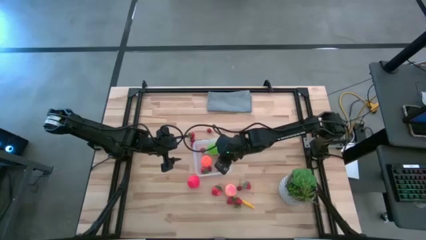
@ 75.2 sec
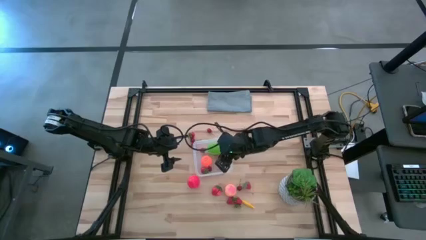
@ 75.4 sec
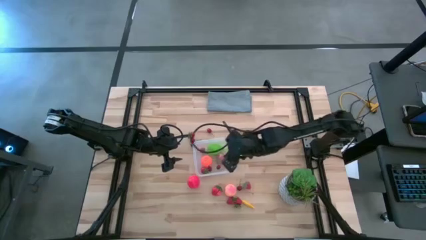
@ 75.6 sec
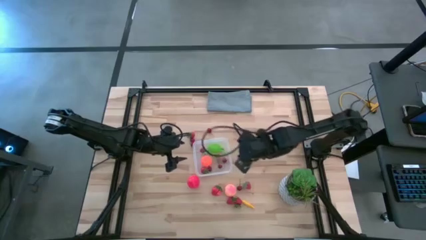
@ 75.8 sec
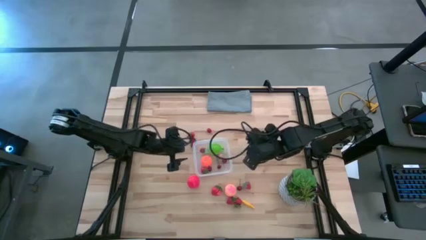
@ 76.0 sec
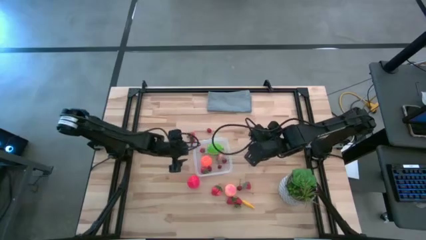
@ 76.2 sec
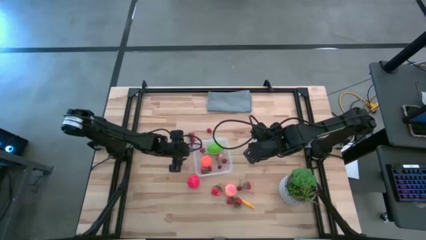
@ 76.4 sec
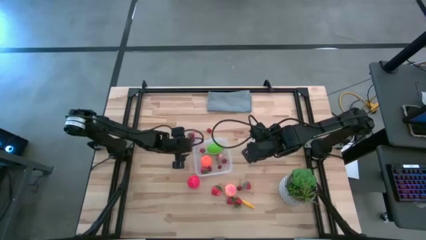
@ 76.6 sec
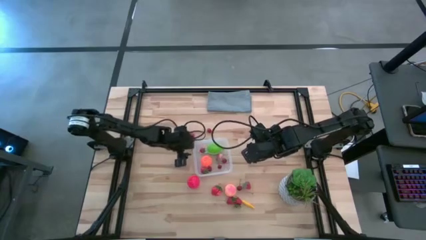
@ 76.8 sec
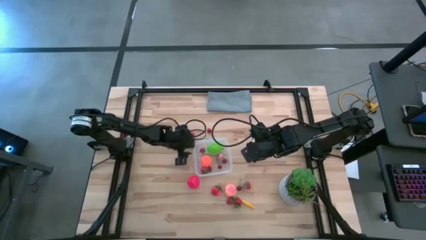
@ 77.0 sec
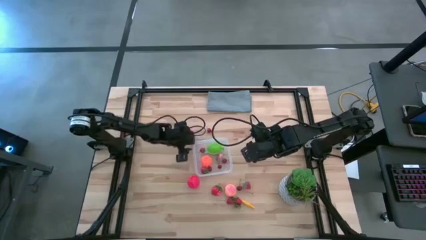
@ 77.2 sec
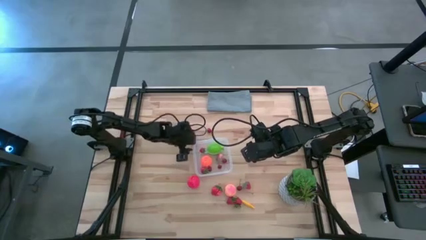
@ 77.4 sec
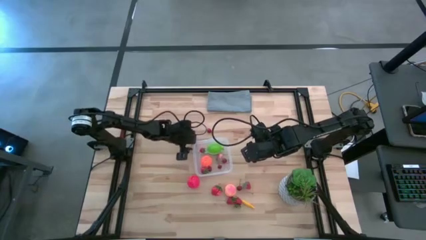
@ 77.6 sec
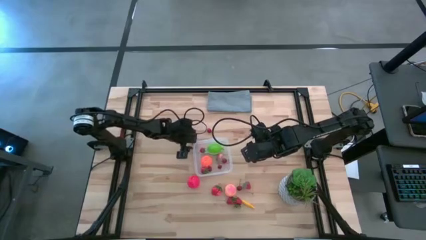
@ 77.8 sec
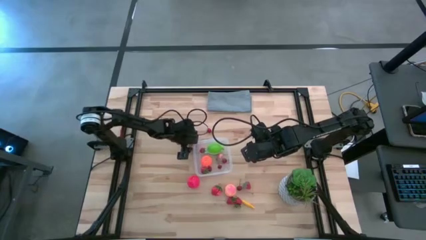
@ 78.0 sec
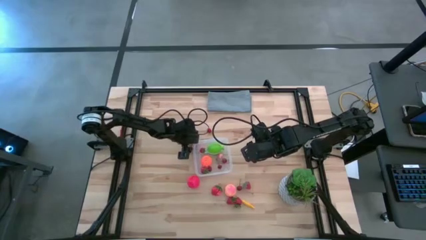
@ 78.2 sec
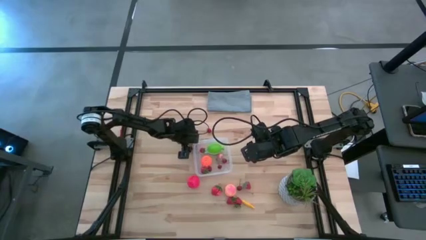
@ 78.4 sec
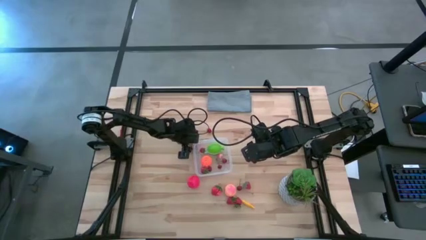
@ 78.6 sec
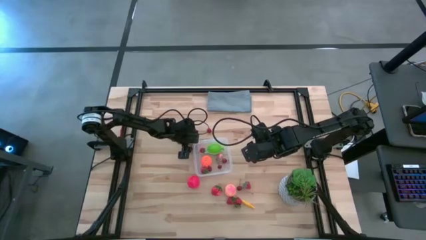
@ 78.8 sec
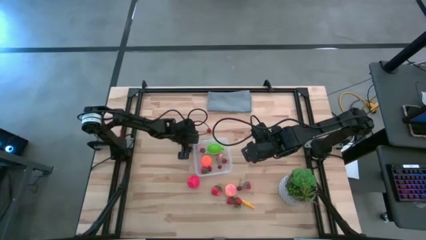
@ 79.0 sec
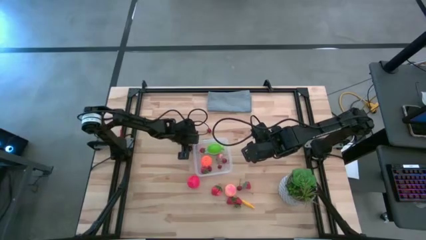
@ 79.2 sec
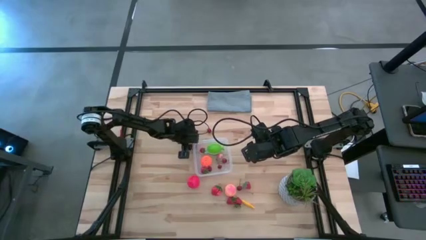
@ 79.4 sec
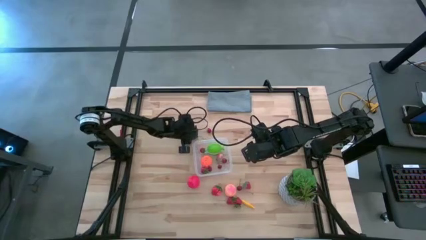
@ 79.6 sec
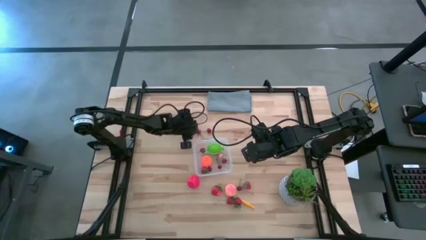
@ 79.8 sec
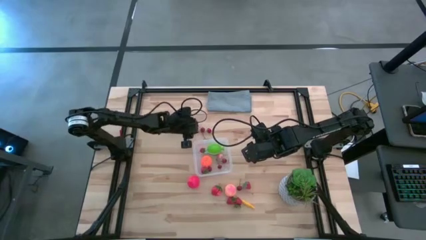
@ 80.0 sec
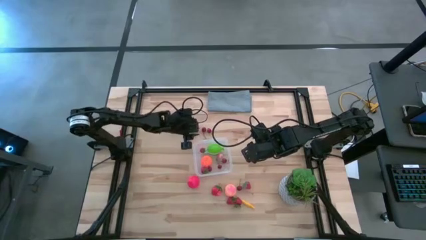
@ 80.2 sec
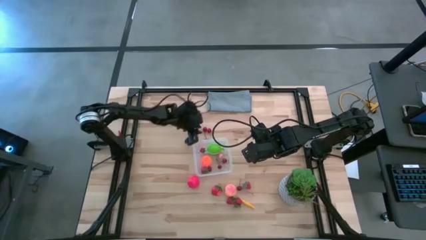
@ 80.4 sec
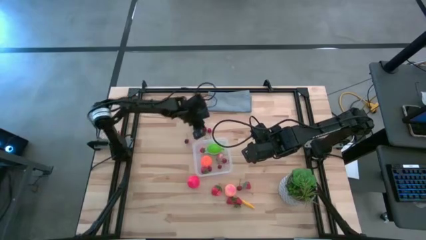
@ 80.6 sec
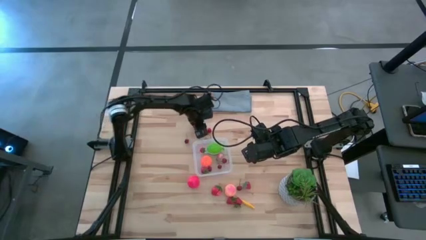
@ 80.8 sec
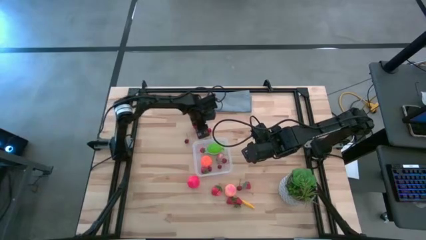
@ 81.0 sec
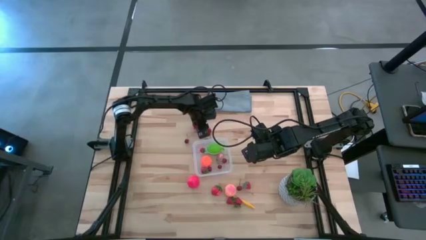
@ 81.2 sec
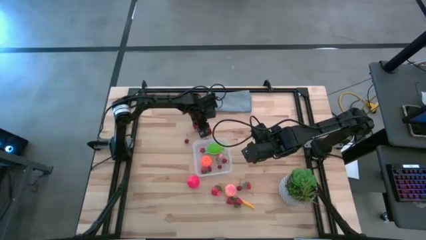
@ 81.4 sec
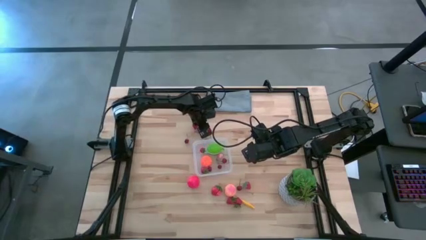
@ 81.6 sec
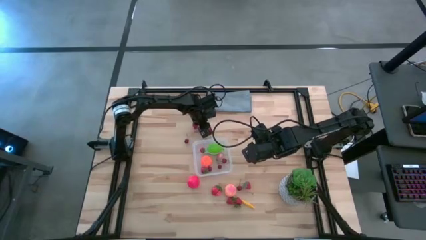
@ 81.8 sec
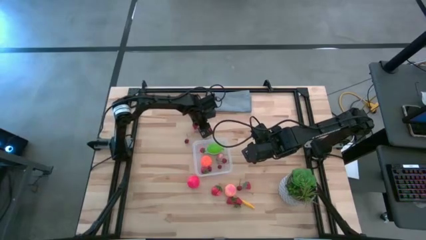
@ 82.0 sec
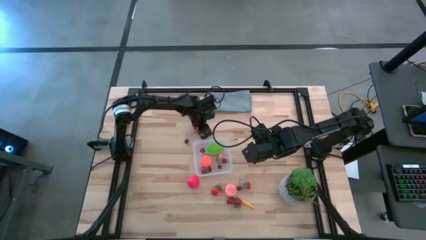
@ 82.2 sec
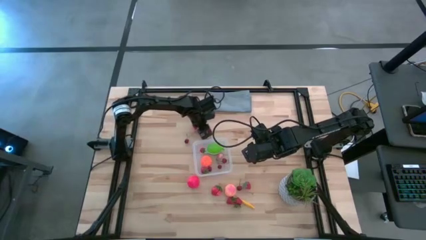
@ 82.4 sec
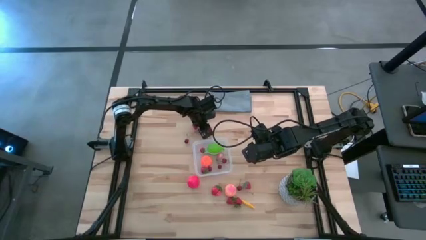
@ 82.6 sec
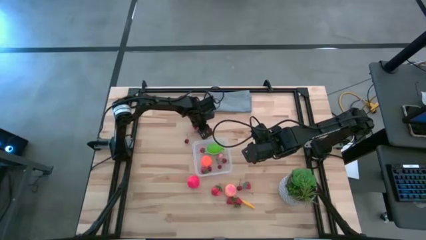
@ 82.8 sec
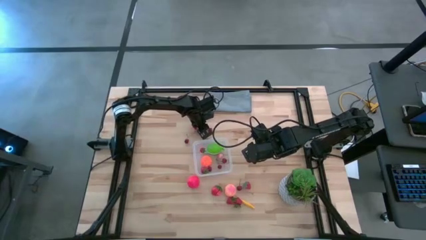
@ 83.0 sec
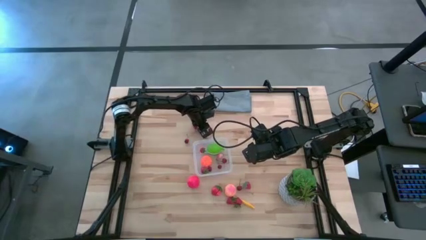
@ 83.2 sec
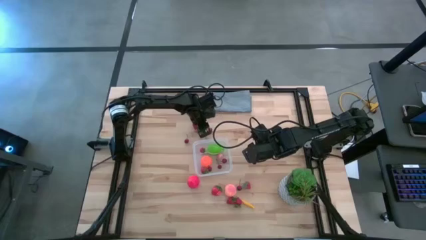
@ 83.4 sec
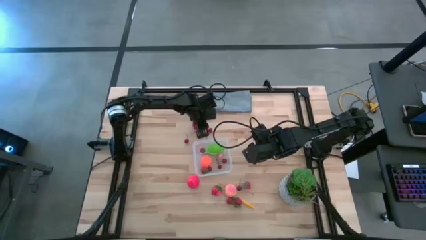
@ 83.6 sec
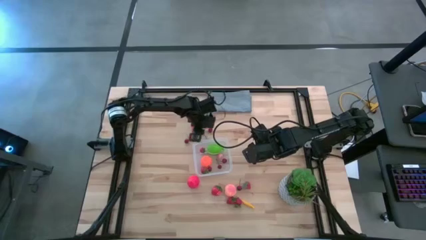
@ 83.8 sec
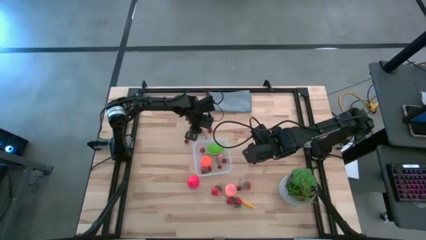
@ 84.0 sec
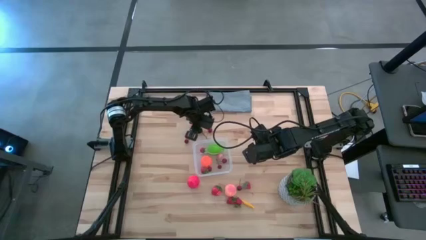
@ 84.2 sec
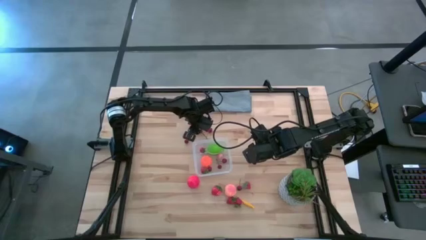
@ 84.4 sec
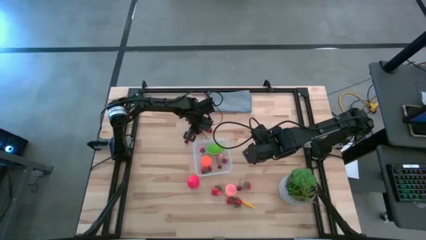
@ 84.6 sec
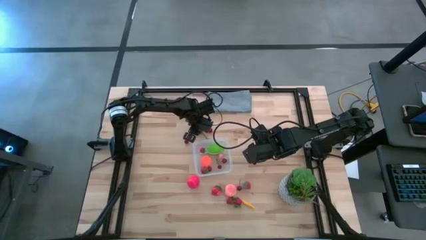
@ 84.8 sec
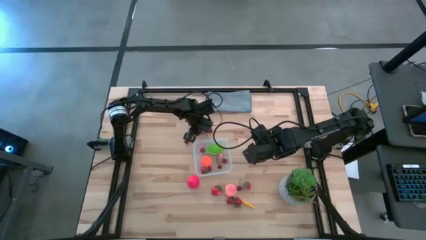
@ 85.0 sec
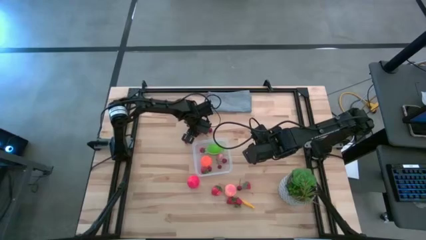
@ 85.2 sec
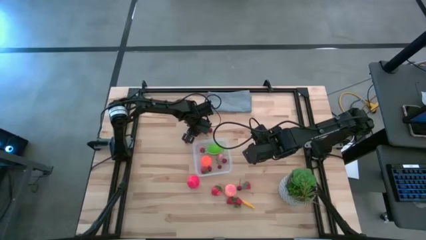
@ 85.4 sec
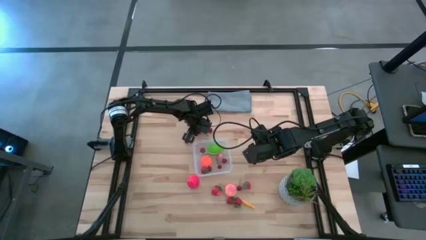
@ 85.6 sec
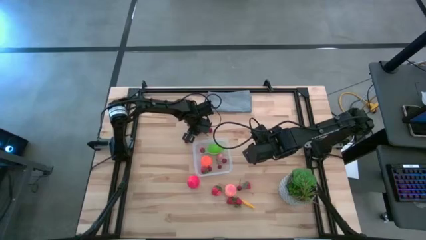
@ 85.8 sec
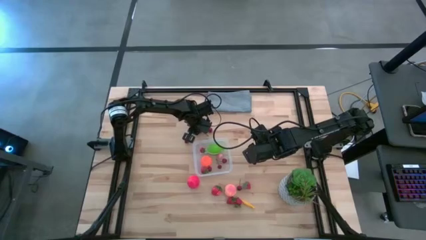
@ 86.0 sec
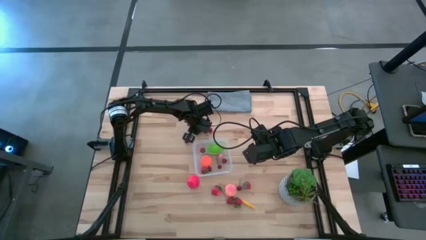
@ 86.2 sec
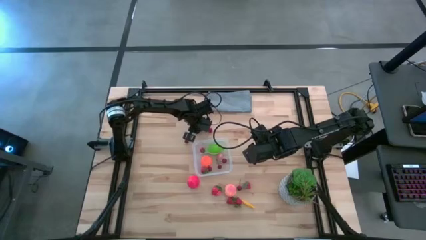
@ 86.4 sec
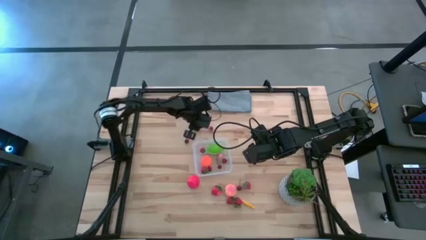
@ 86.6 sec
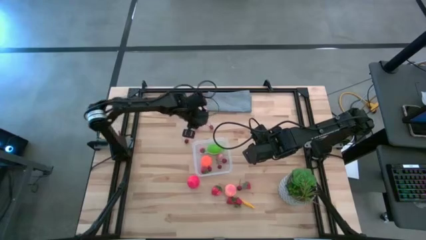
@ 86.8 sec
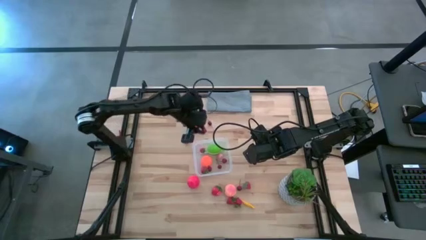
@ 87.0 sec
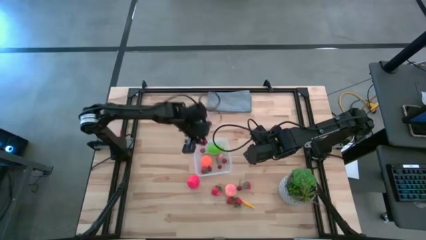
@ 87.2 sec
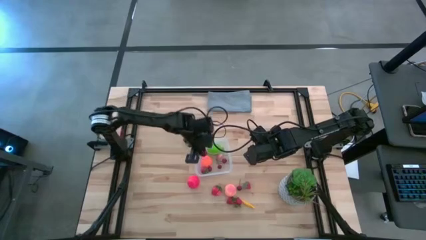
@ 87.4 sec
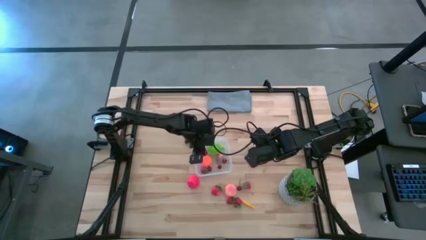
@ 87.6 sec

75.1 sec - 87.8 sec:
Task: Pick and placing Produce into tupperware
Put the red cherry into the transparent container

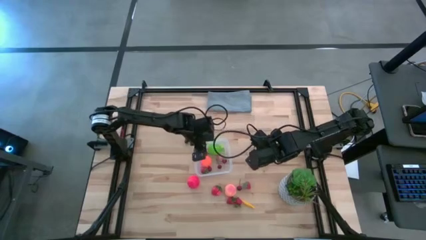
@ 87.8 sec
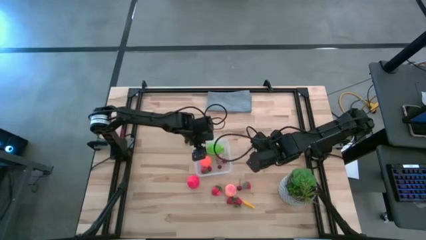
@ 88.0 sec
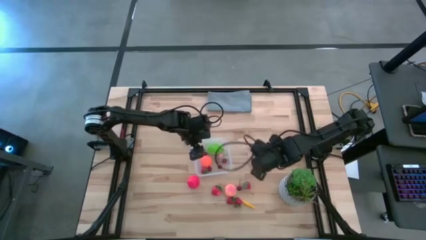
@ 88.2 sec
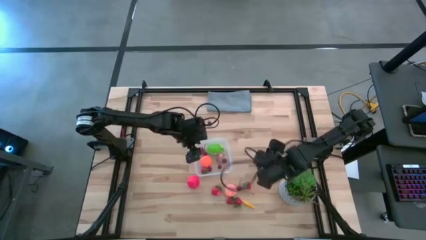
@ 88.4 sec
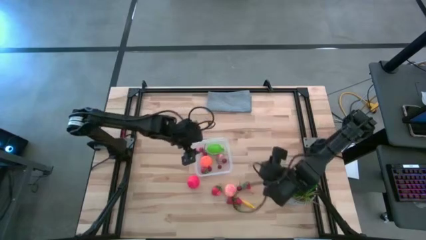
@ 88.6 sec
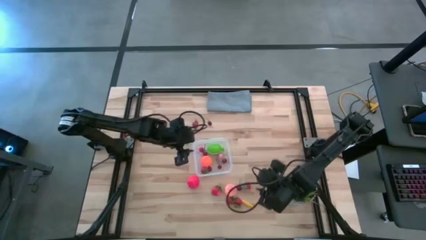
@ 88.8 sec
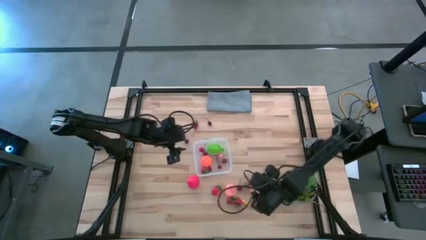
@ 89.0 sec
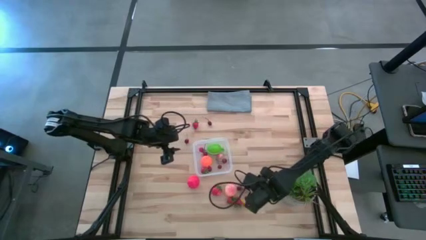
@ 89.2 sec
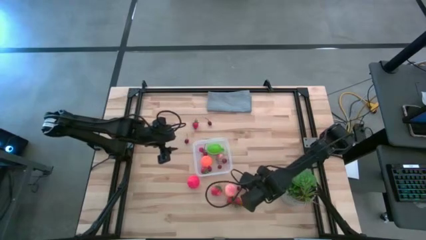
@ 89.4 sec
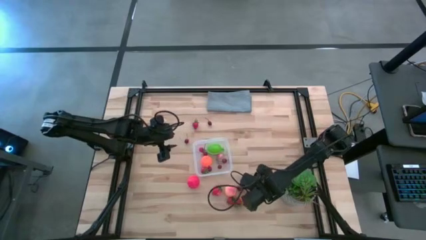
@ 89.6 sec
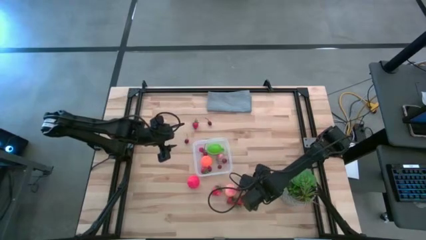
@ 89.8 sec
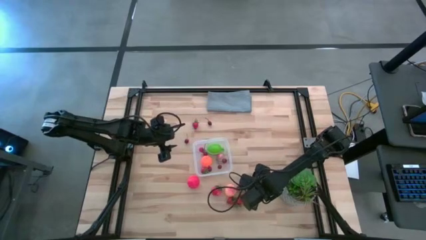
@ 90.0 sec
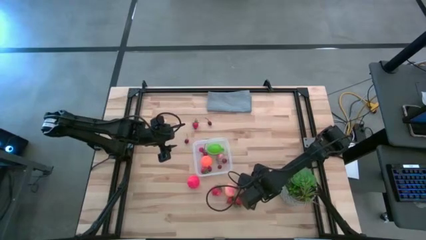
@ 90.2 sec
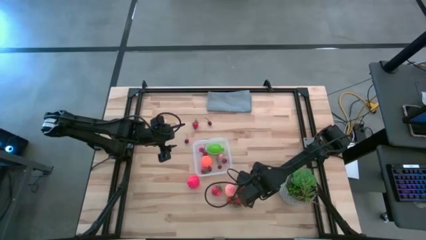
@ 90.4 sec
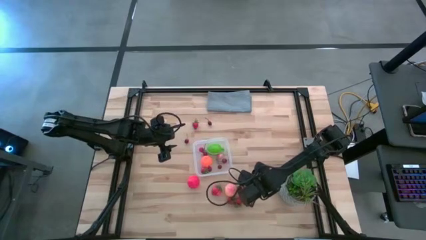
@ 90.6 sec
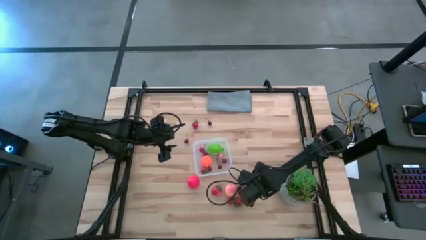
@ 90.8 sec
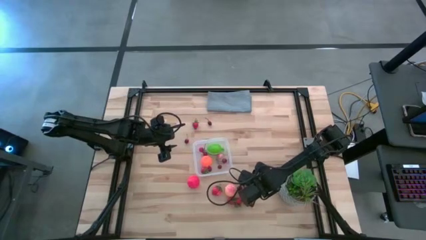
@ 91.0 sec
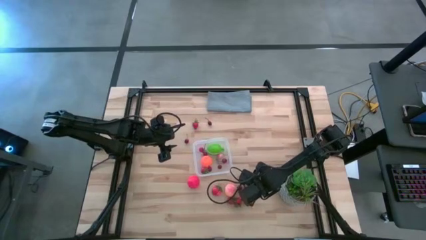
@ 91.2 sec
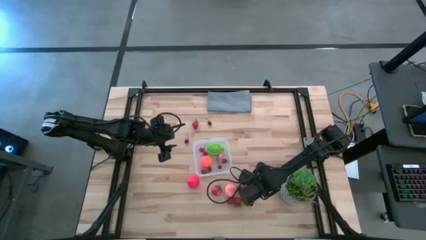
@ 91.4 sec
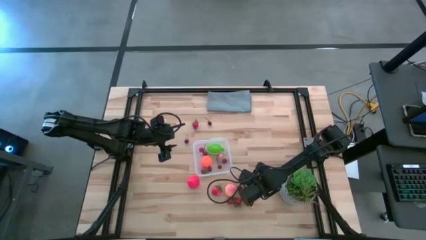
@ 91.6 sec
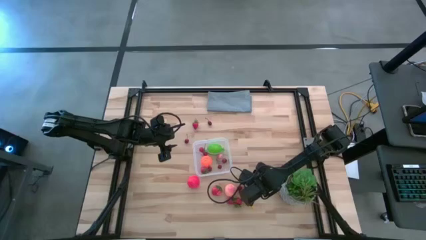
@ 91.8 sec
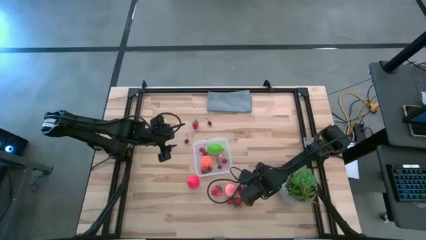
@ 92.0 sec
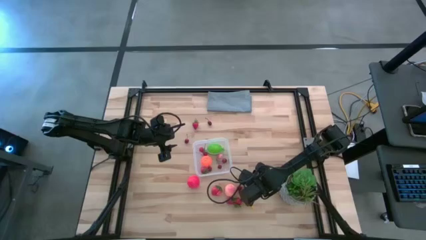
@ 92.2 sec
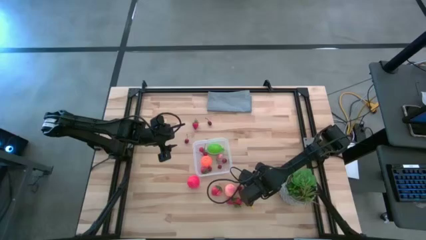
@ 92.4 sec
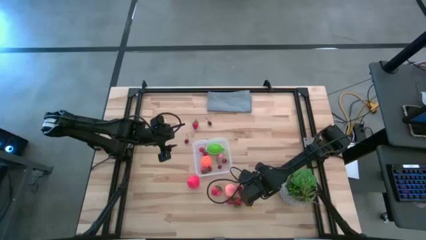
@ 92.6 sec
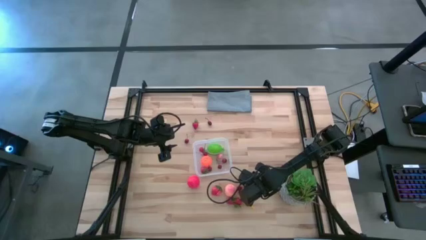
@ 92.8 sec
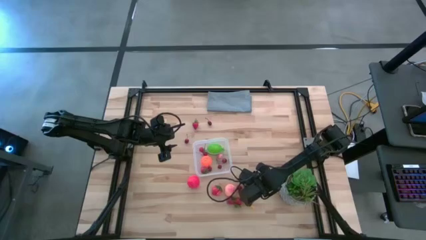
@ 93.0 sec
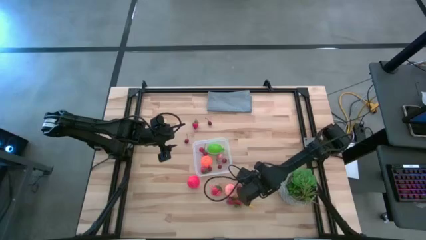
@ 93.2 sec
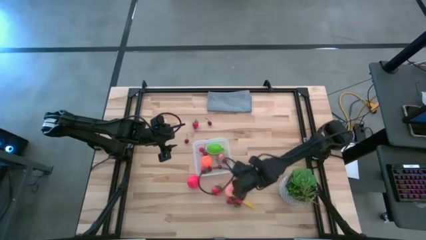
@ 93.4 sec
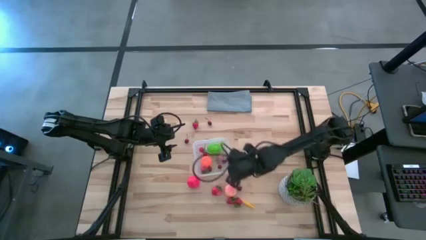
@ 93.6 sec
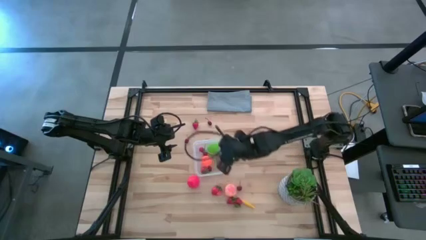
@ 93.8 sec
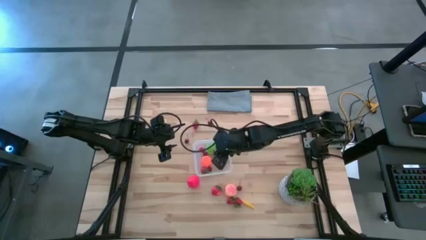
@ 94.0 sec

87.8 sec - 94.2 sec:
Put the red strawberry into the transparent container
